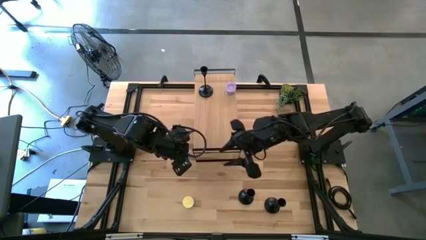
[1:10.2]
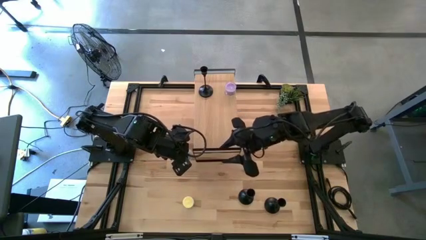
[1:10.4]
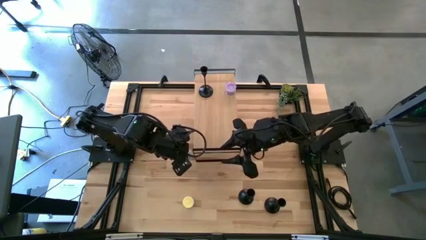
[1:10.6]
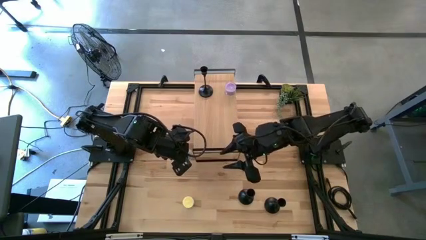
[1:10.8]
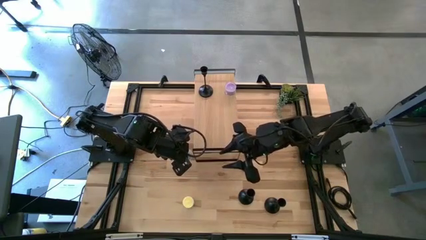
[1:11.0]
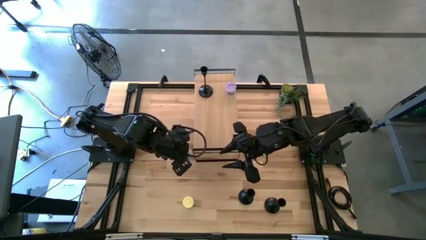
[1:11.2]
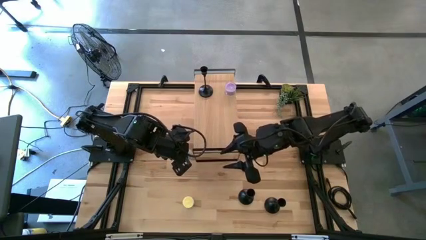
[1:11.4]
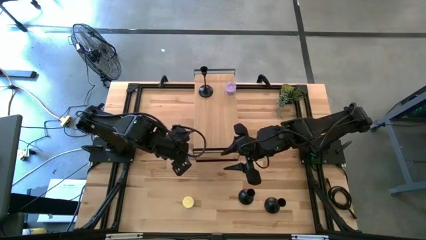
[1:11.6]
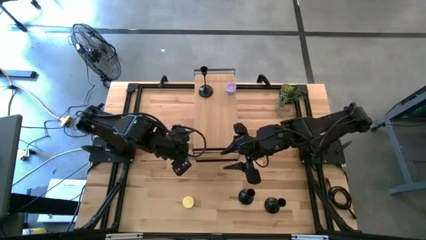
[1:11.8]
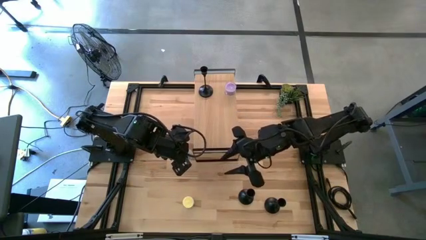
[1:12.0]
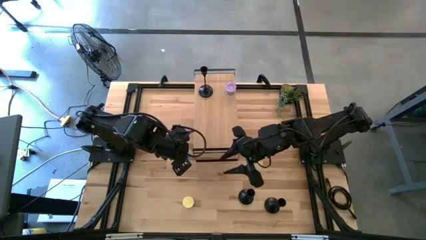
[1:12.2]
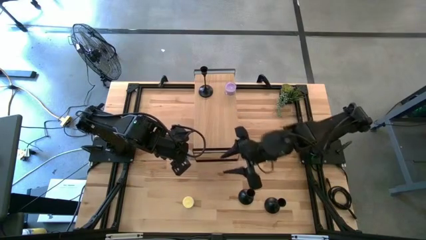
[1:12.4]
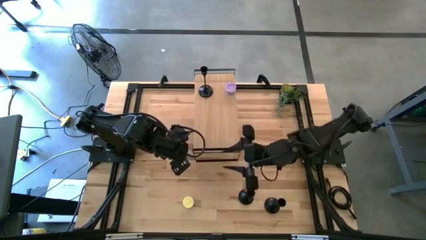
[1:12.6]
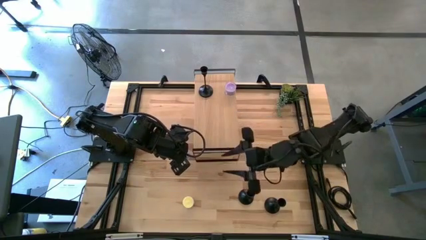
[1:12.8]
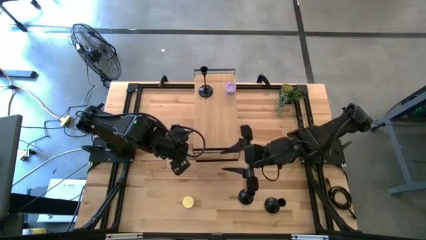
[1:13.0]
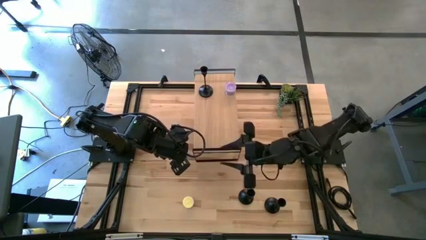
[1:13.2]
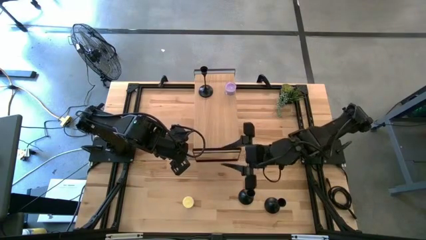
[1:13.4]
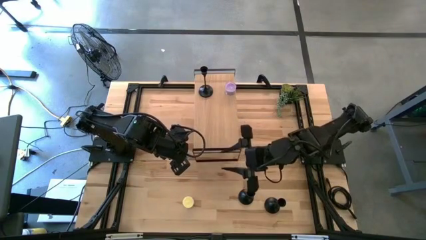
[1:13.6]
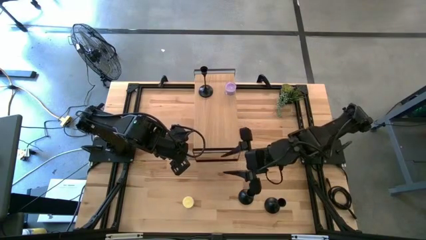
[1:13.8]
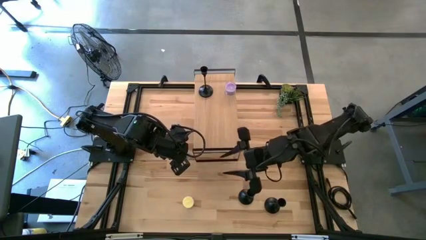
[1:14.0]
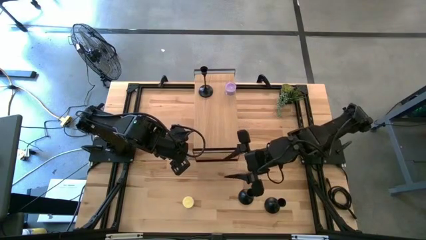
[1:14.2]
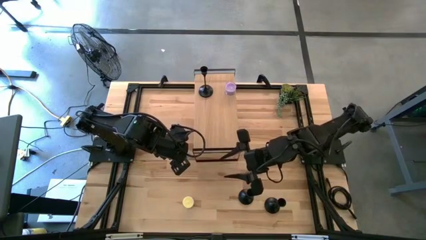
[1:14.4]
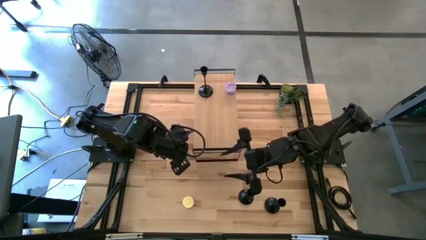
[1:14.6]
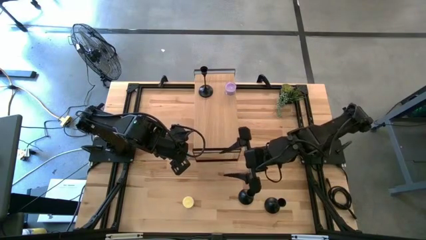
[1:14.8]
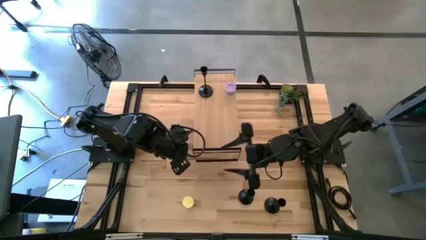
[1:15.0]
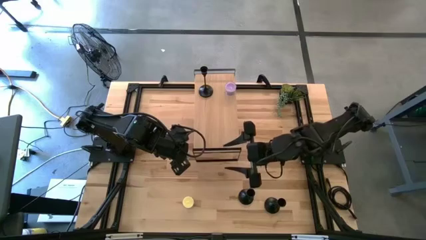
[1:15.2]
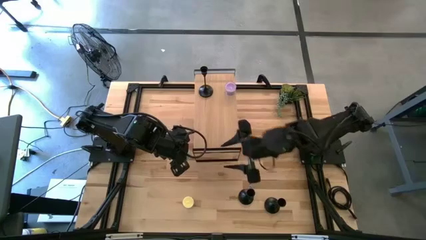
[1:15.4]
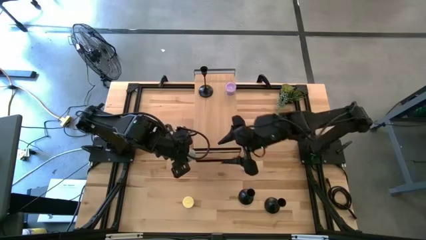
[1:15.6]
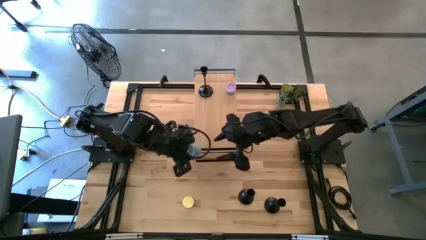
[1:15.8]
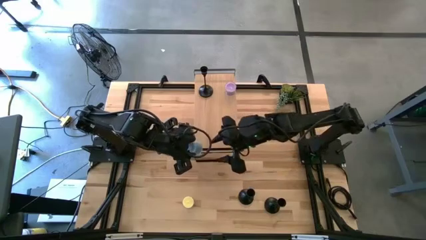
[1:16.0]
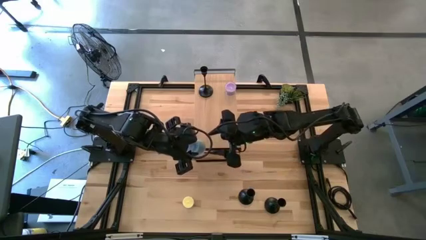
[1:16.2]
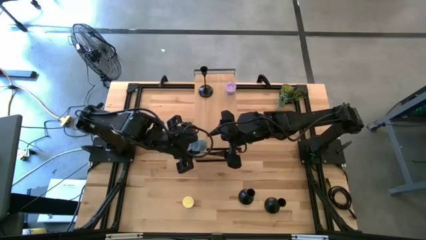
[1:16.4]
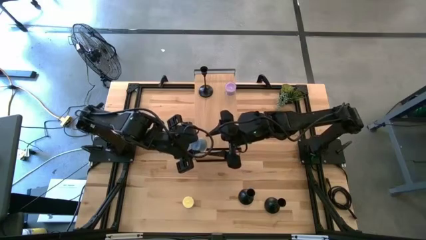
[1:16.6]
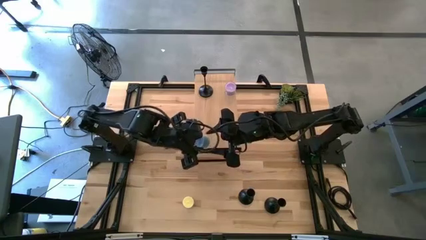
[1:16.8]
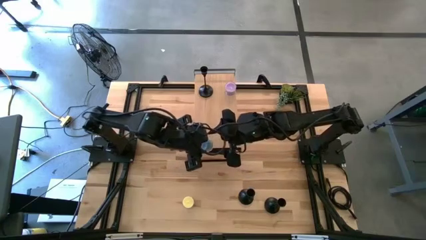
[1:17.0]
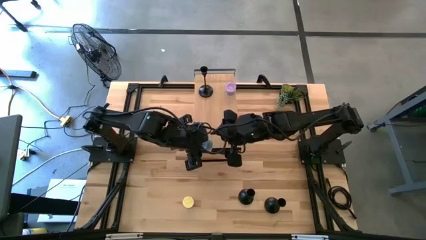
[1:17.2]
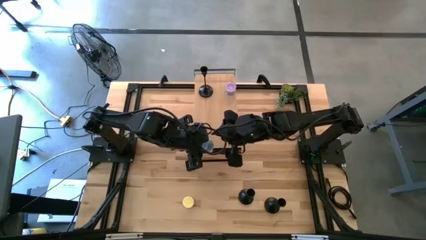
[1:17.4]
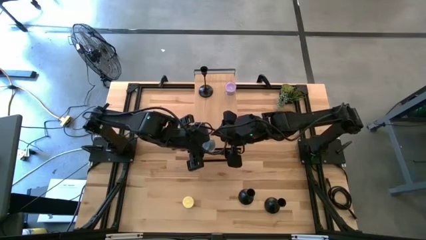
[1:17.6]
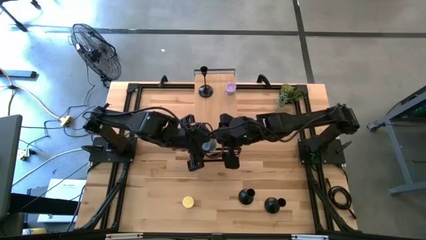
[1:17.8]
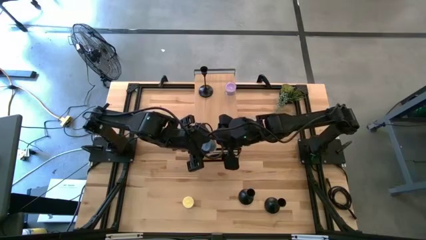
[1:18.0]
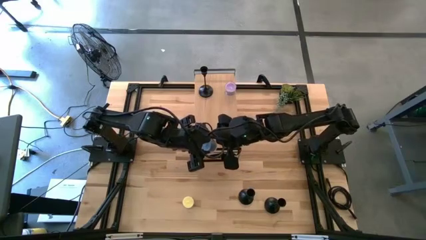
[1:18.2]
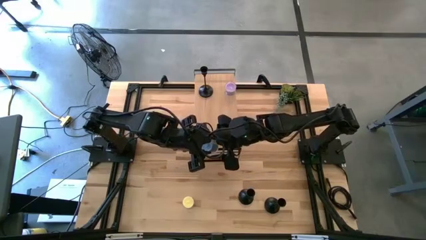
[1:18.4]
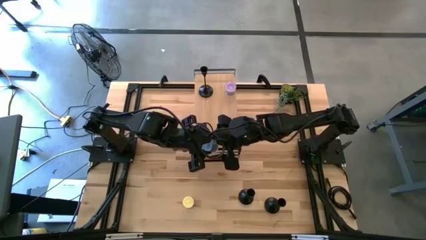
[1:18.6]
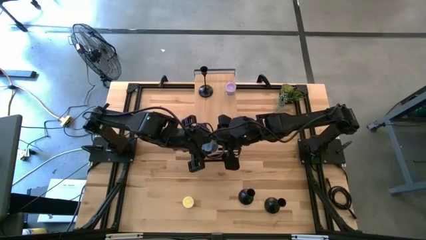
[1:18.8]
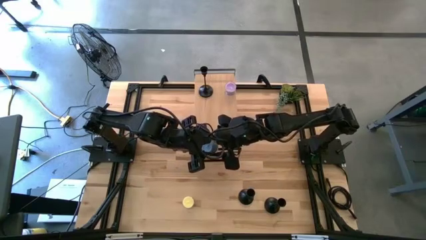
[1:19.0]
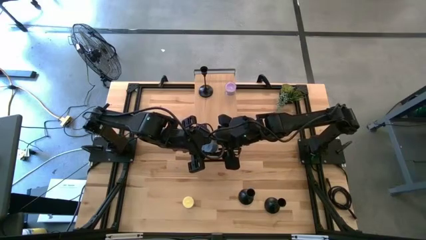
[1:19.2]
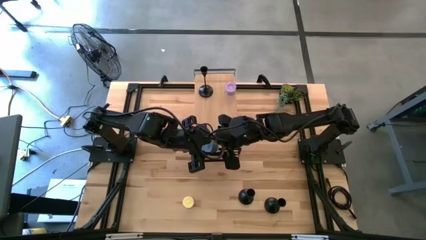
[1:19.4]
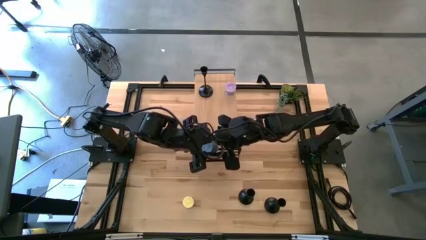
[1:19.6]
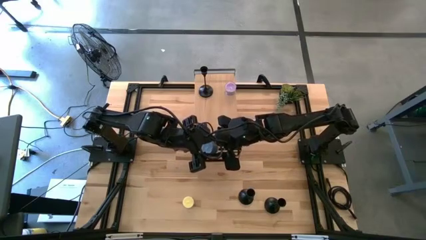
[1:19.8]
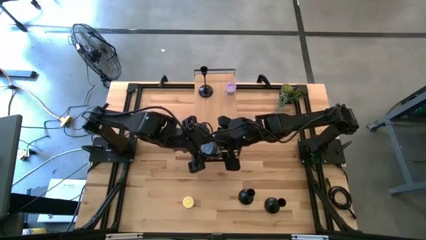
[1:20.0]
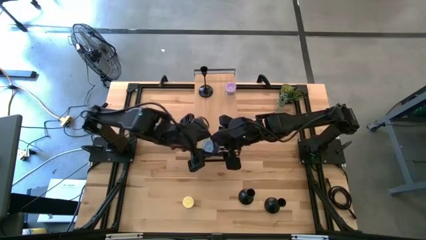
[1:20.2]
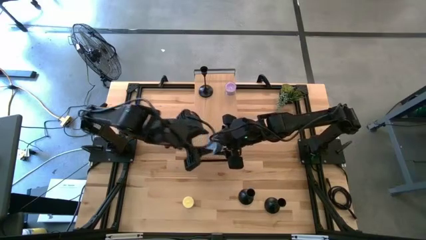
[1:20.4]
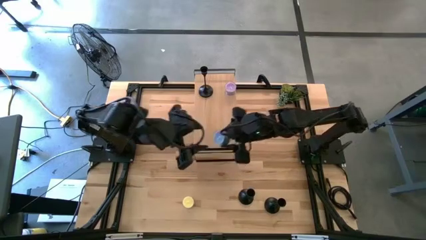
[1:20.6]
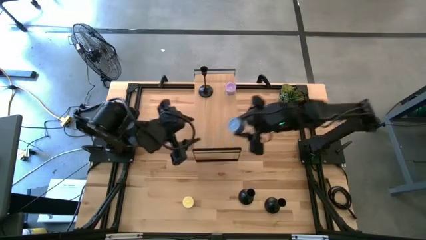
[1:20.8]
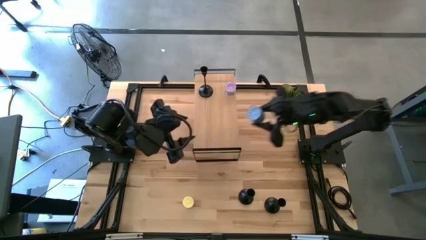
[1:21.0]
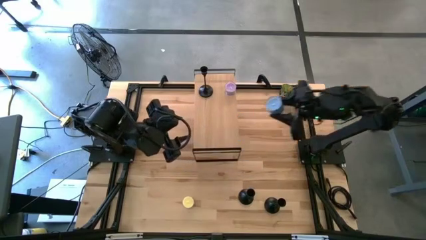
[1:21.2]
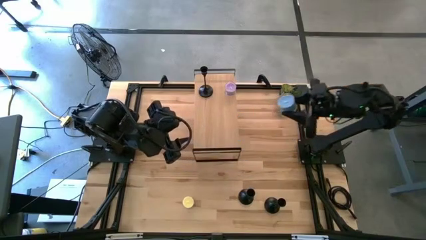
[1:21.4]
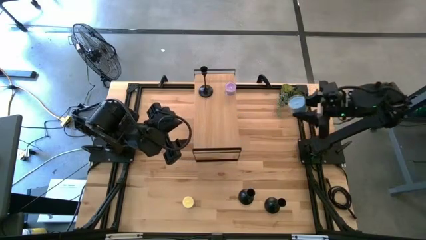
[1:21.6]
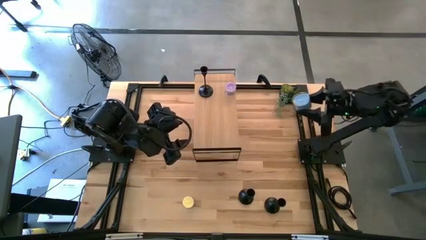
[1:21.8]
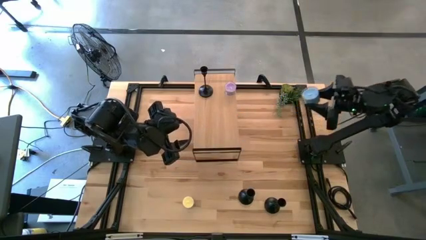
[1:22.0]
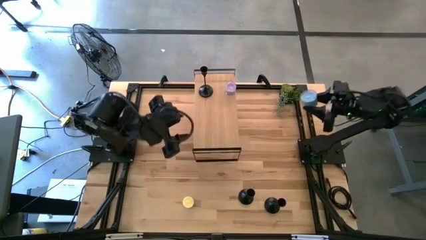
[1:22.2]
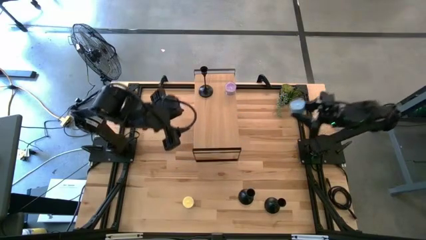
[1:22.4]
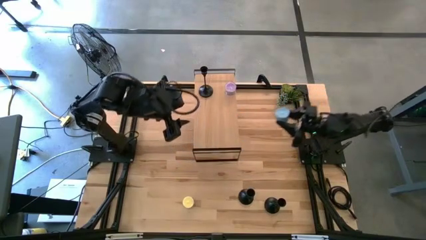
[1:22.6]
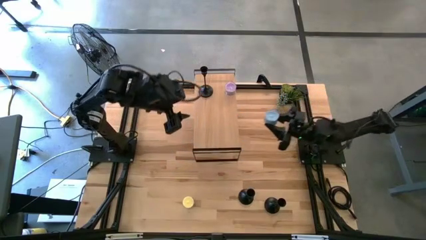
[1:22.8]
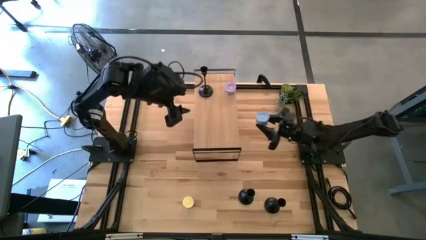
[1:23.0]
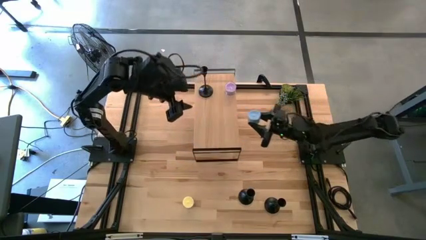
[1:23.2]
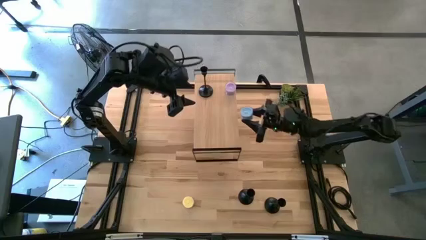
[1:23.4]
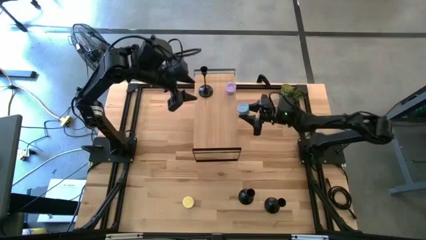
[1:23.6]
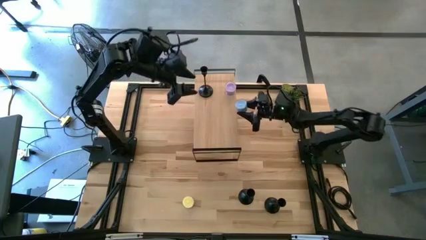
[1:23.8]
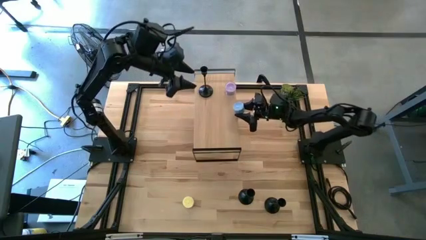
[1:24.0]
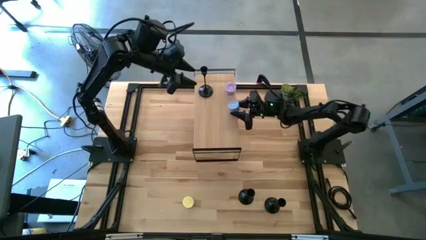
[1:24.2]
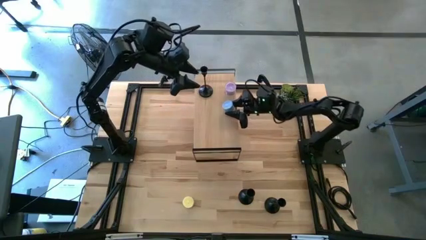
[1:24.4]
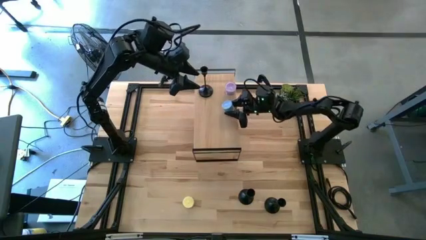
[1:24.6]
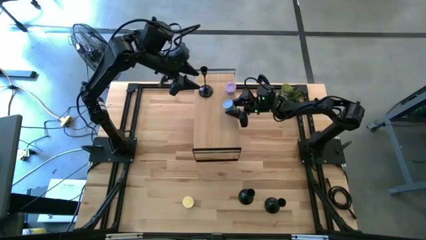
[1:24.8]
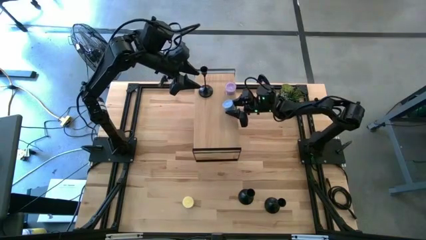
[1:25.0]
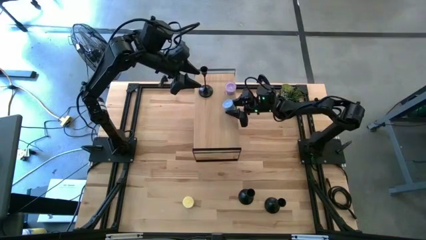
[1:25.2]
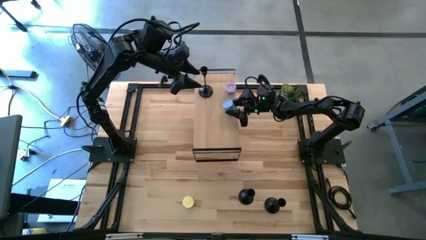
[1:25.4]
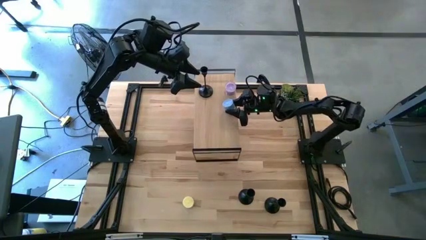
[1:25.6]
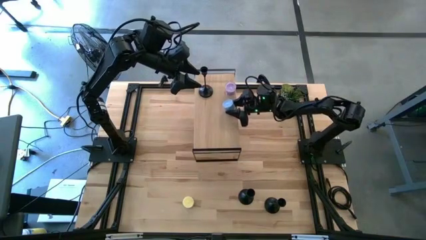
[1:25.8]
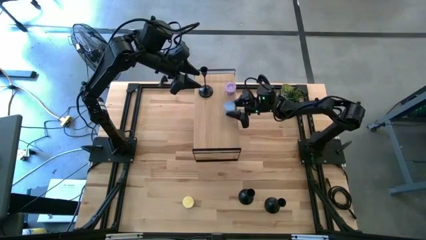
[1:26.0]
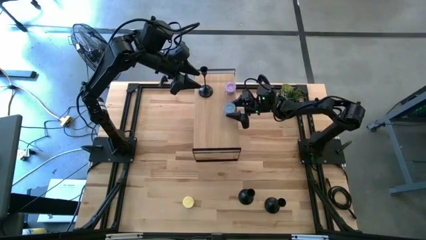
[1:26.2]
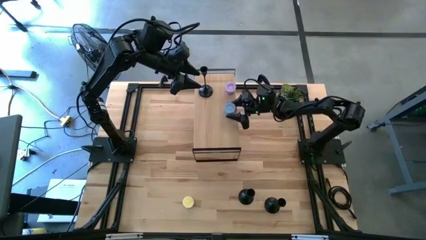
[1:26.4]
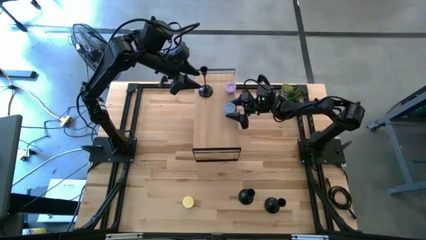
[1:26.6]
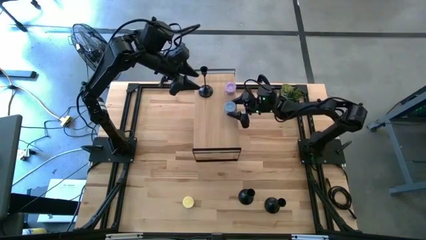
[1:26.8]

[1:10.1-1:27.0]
Task: Pick & Place candle stick holders
Put the blue scented candle on the shelf
